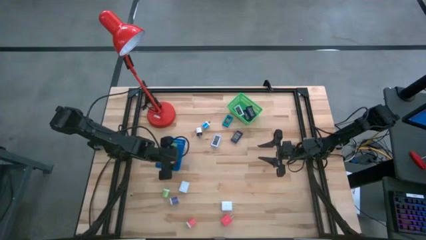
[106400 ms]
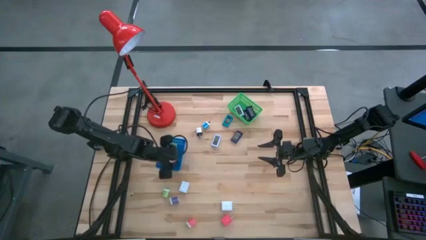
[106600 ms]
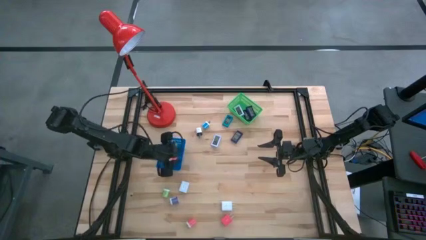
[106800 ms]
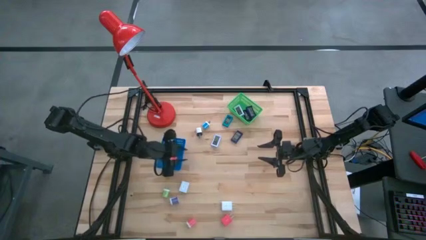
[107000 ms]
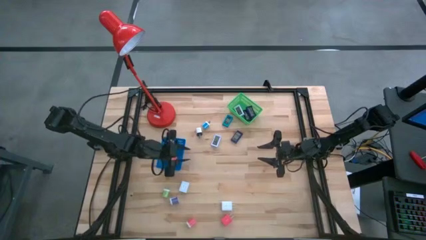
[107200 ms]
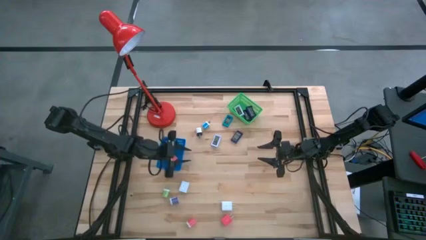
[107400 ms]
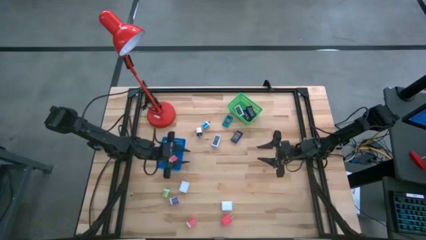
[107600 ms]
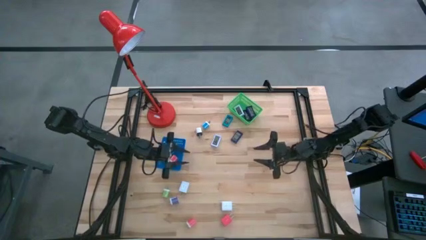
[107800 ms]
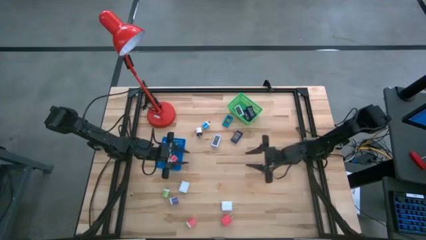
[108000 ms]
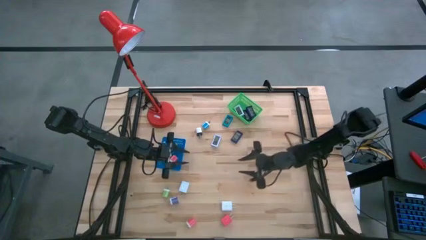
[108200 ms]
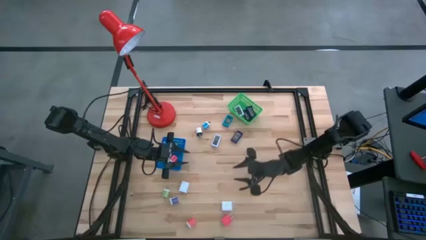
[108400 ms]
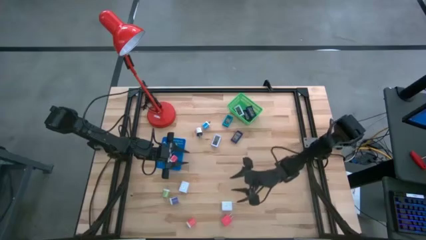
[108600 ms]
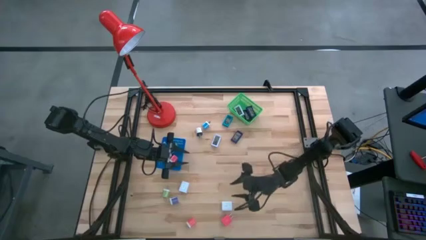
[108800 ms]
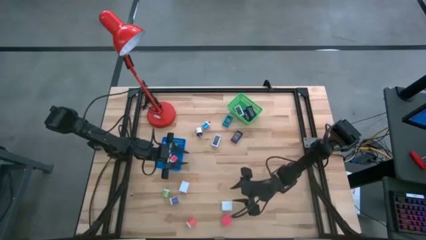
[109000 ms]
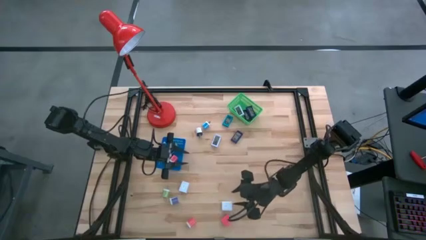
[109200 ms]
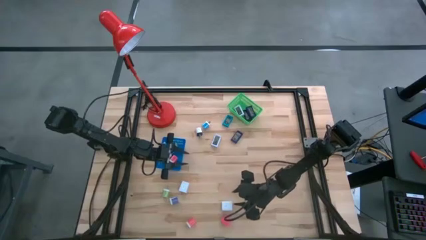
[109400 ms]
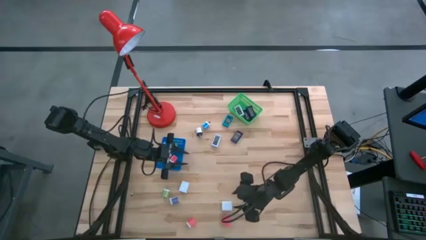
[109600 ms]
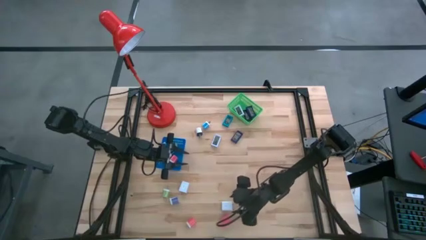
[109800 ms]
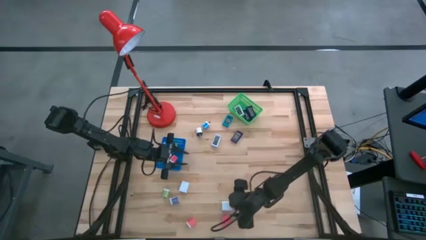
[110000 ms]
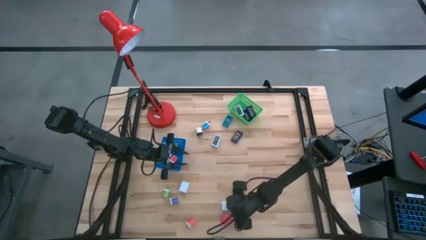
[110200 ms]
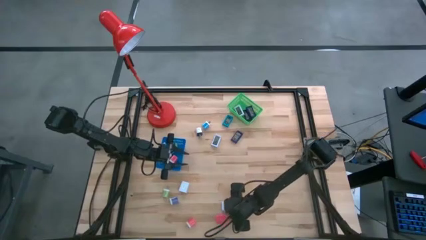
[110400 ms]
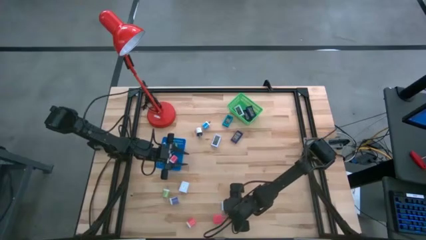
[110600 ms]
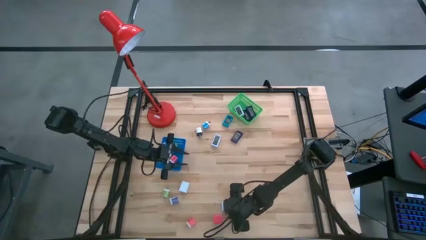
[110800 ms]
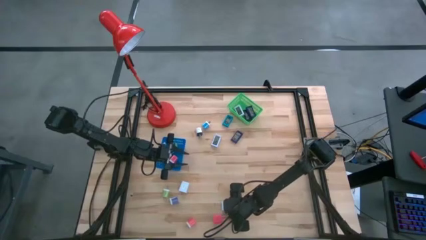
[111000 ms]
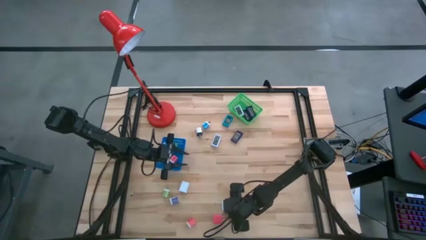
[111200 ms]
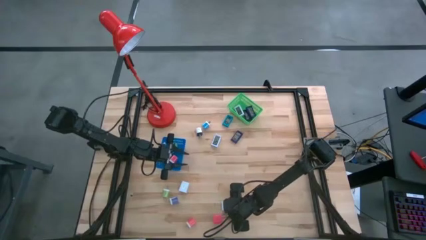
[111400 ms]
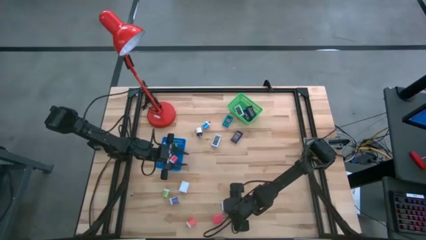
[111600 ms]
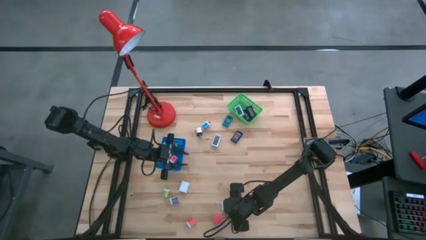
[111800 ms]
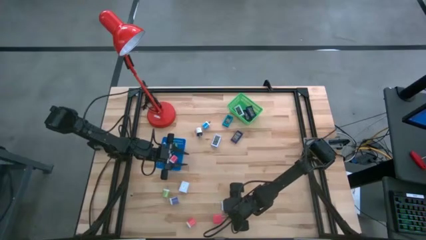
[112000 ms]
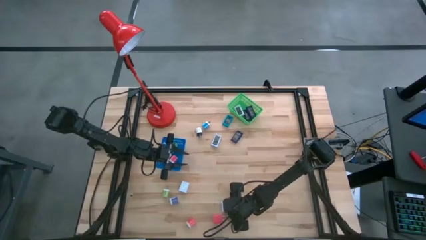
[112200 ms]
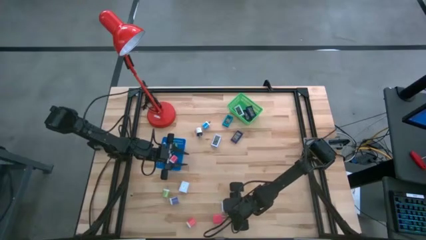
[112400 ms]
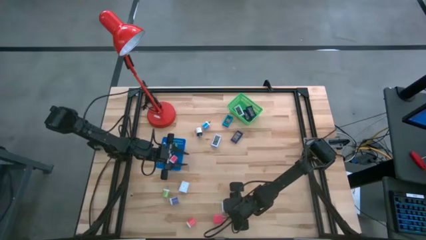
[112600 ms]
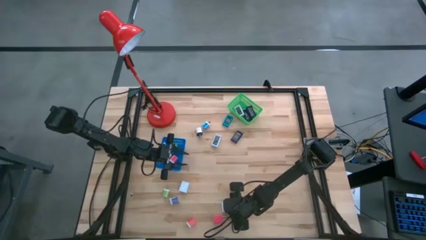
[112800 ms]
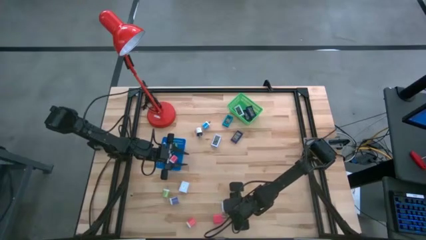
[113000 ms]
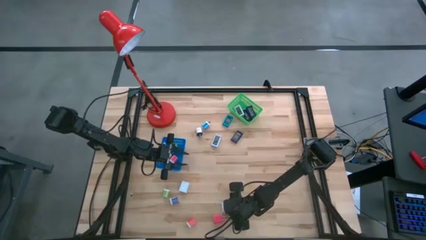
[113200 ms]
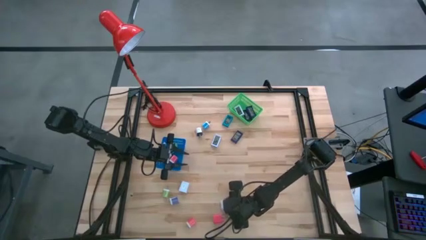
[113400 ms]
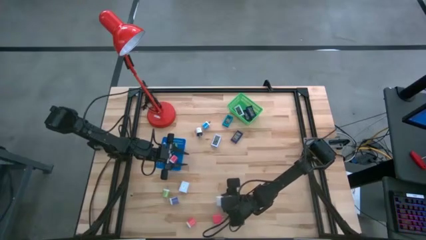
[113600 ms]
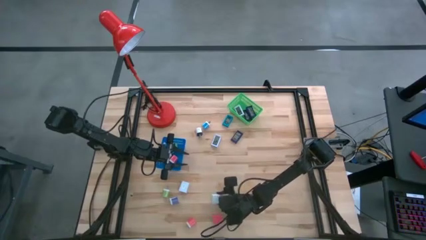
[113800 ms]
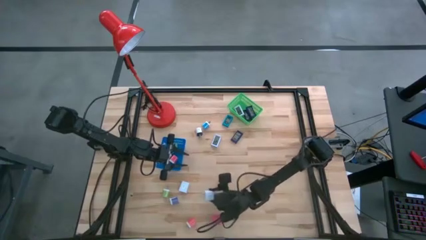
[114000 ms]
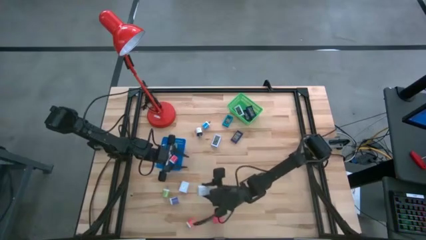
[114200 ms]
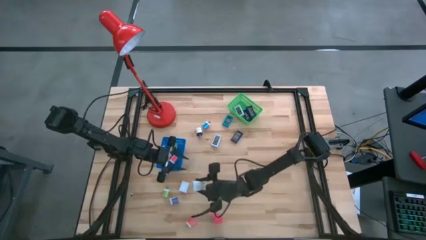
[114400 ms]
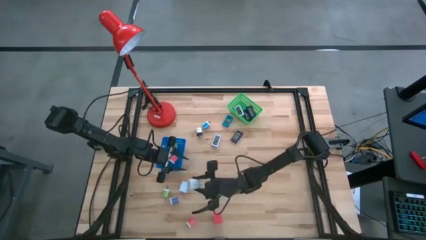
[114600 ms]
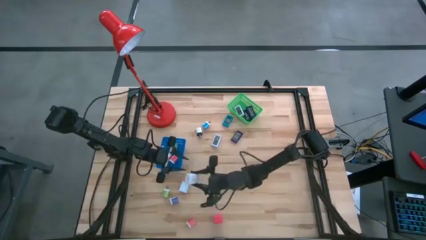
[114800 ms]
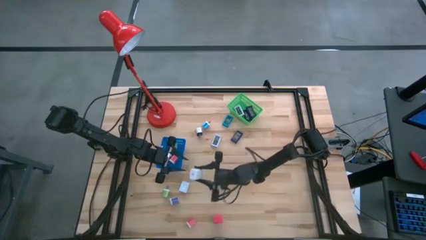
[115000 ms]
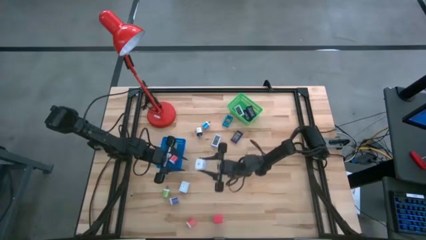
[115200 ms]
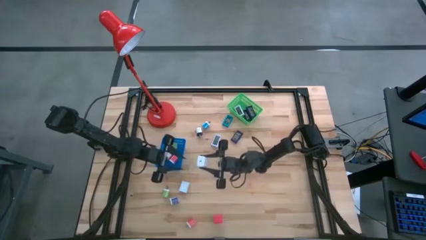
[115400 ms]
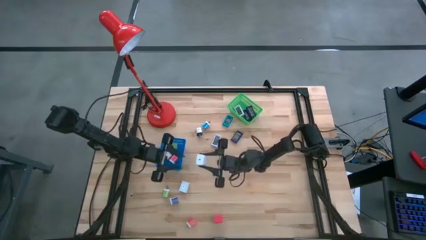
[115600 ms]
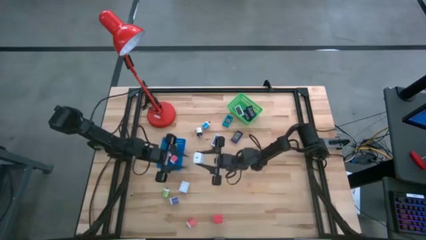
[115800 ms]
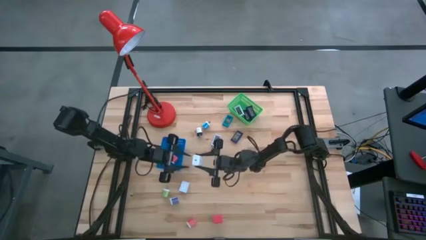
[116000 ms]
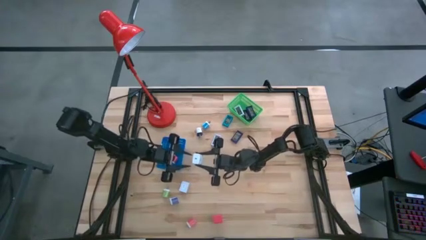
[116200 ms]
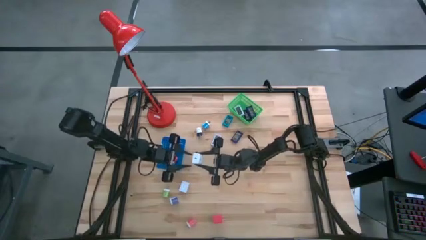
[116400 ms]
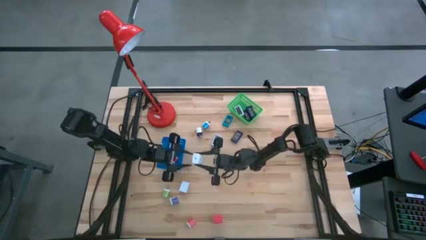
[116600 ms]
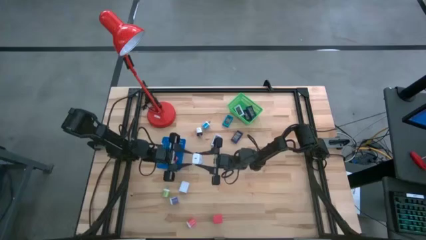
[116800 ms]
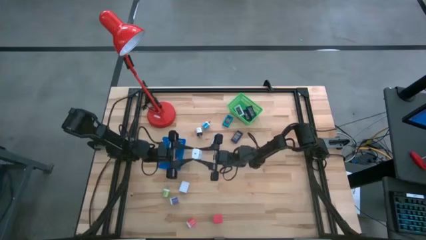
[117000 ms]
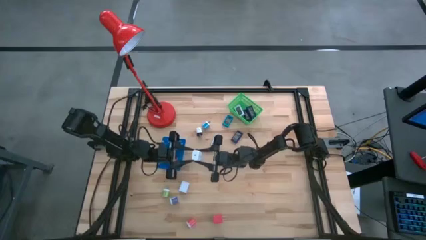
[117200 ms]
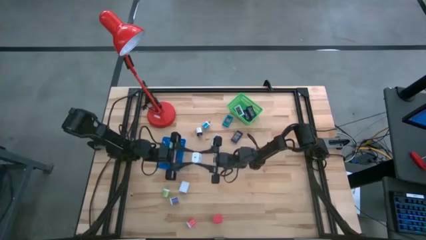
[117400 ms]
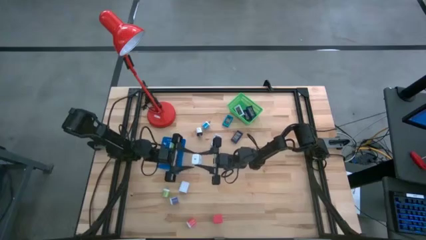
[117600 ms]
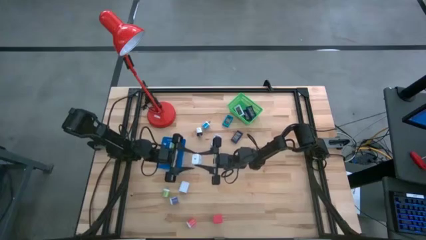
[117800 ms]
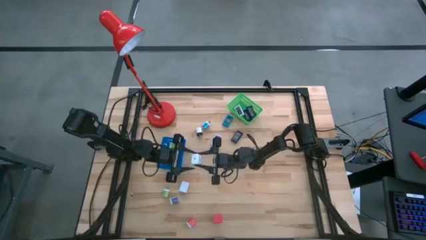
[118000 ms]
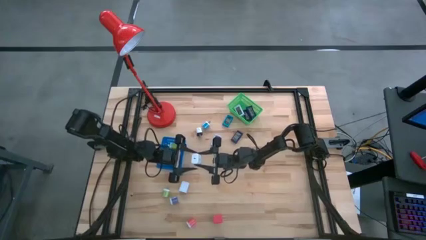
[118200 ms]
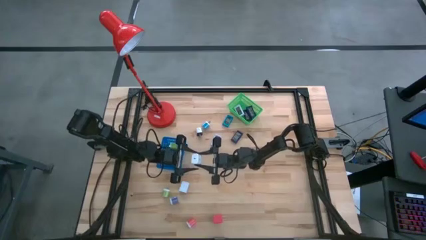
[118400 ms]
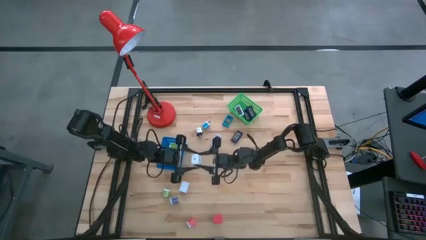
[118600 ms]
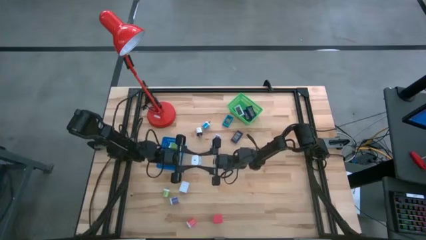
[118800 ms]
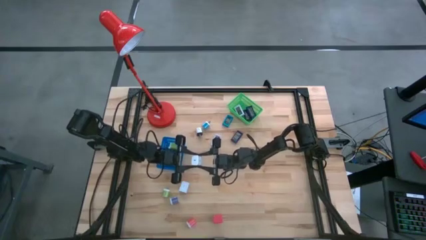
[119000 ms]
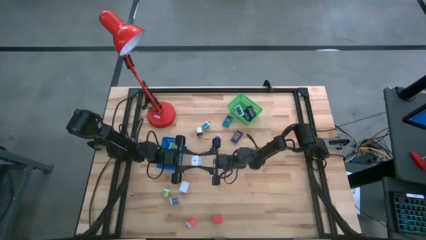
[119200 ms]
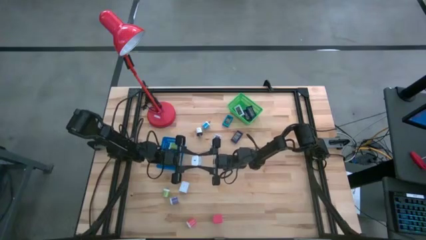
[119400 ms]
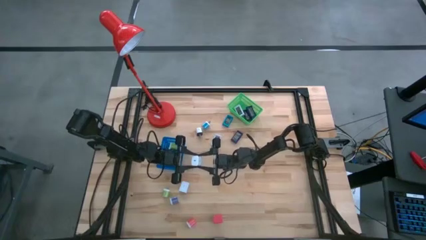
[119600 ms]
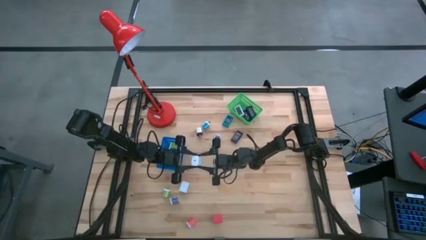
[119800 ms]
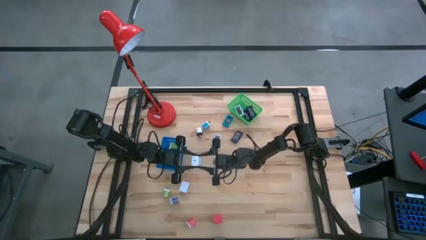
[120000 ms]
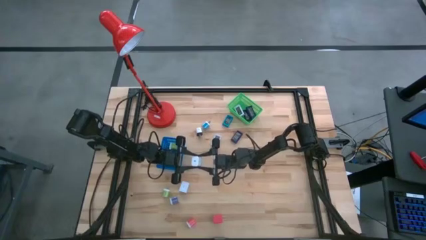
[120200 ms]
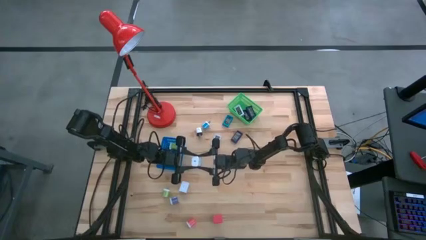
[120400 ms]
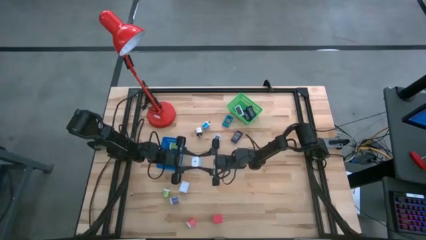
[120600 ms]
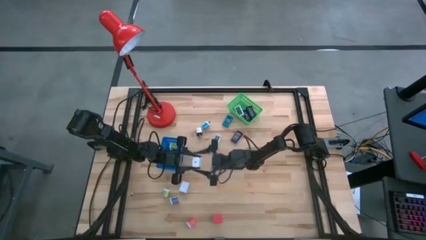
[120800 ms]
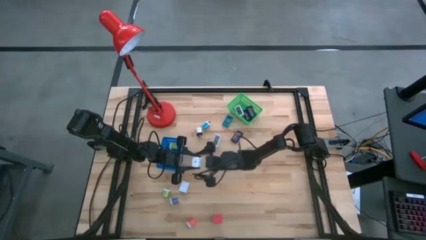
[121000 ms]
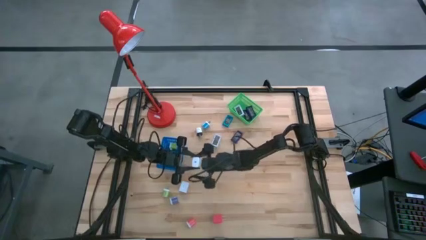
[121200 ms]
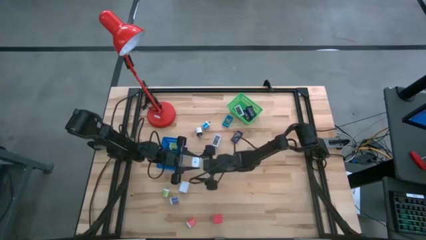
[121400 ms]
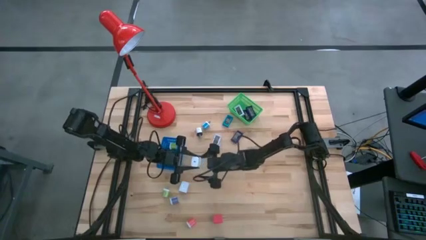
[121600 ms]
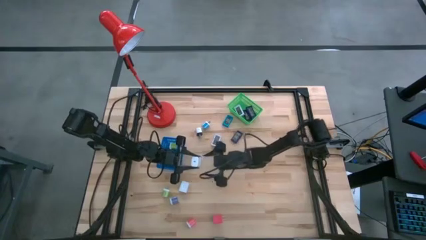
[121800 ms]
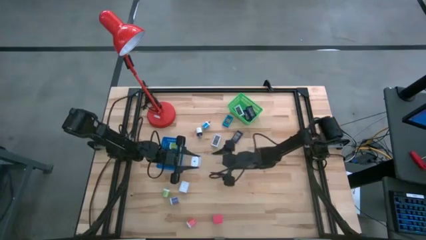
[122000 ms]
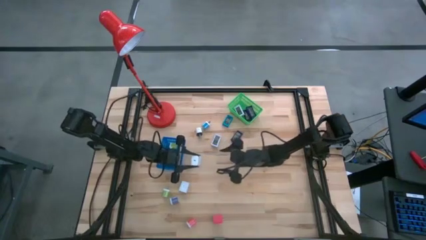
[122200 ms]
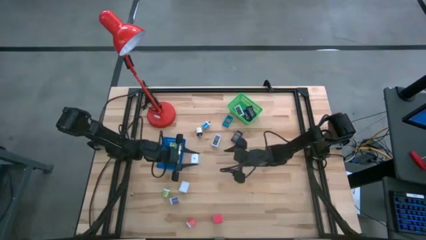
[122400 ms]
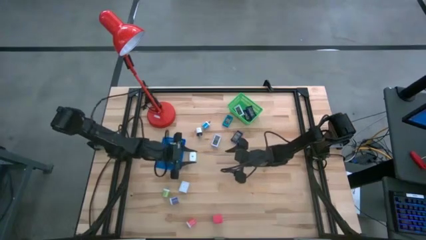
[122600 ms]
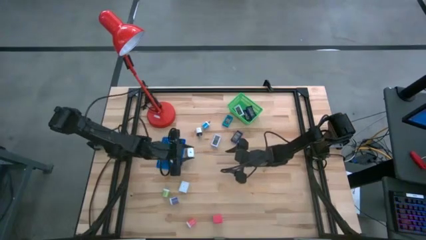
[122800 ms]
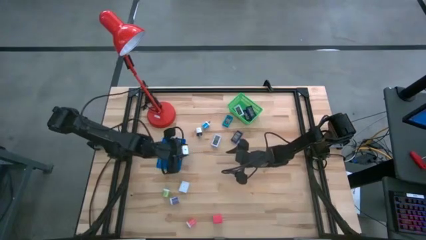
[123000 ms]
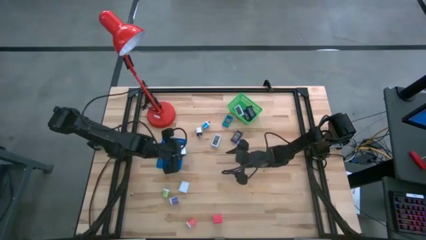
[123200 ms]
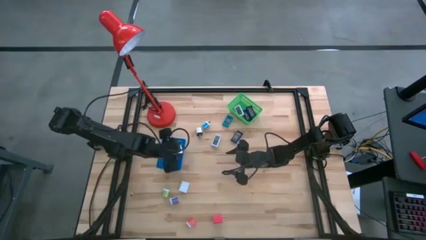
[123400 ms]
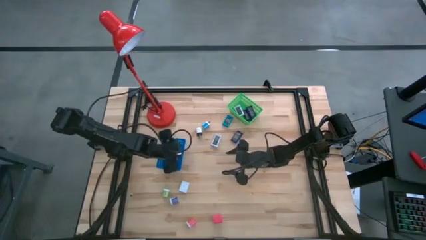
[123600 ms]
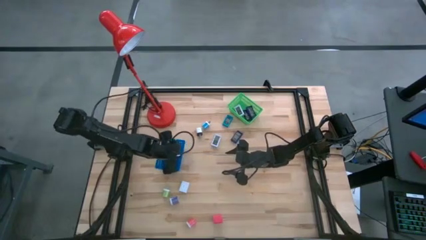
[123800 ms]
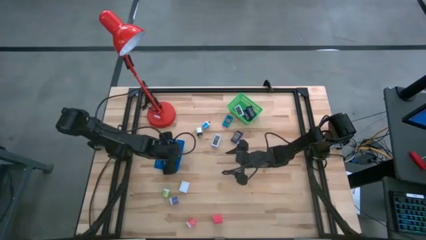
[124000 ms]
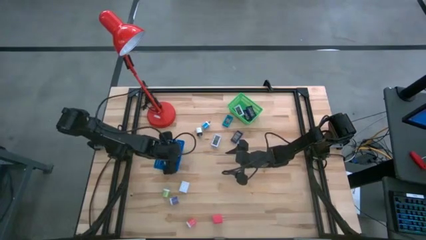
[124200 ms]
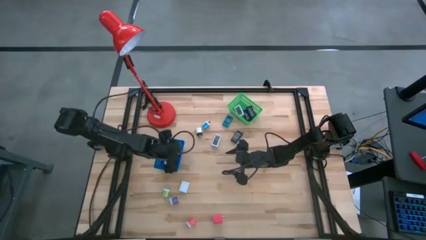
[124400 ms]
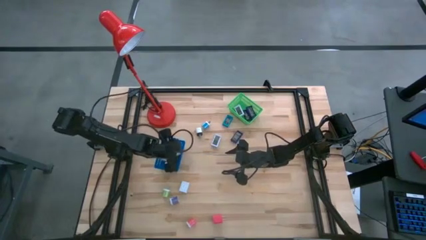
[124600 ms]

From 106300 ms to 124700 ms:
Task: Pick & Place Office items
Put the right white charger adapter into the blue basket
